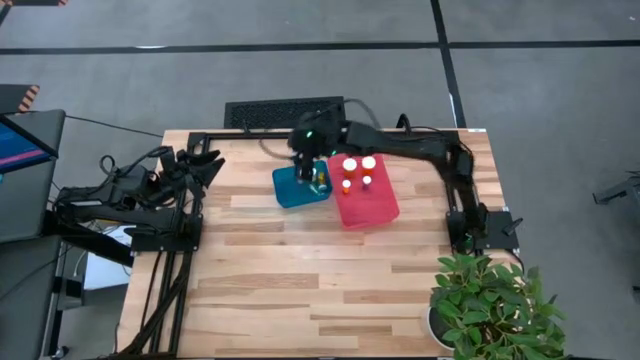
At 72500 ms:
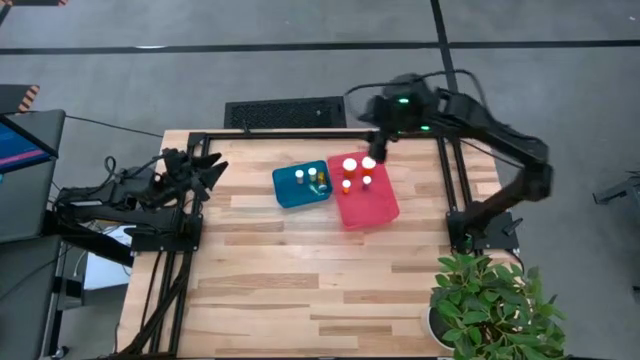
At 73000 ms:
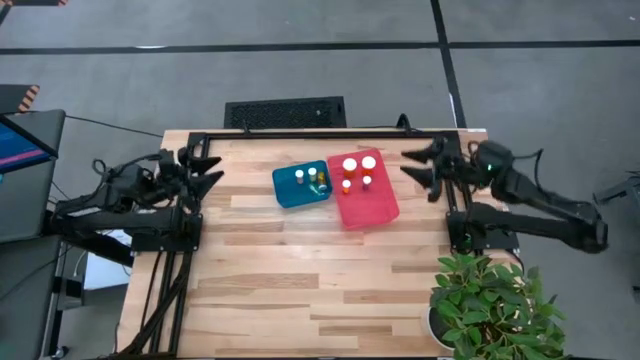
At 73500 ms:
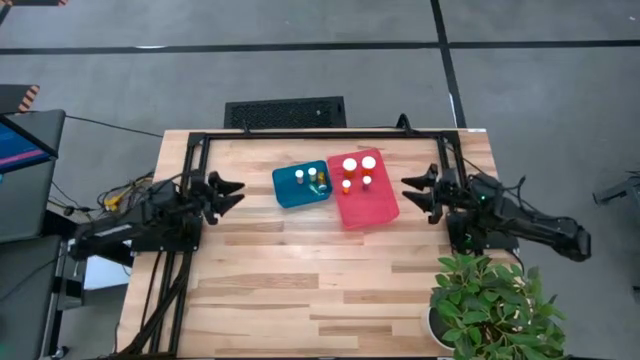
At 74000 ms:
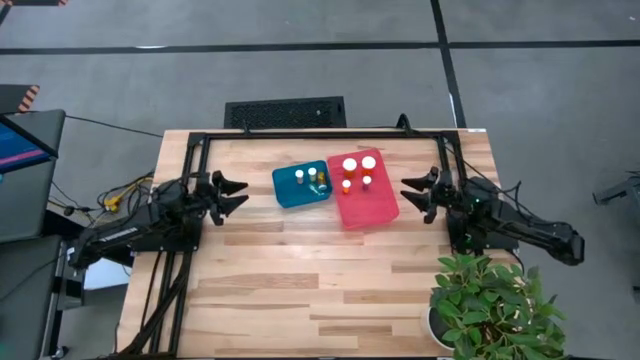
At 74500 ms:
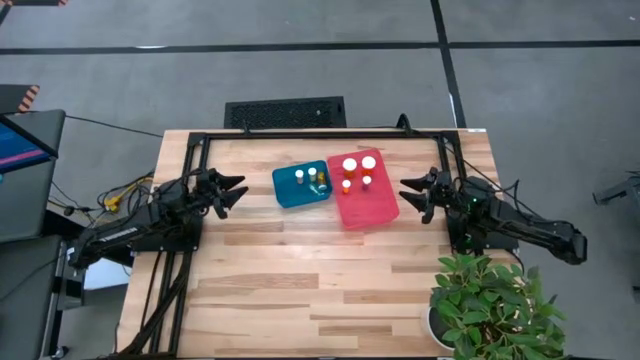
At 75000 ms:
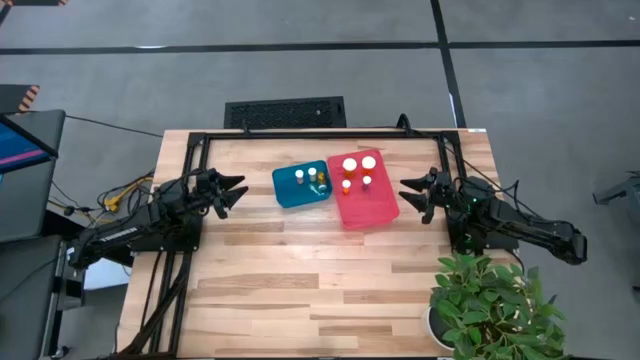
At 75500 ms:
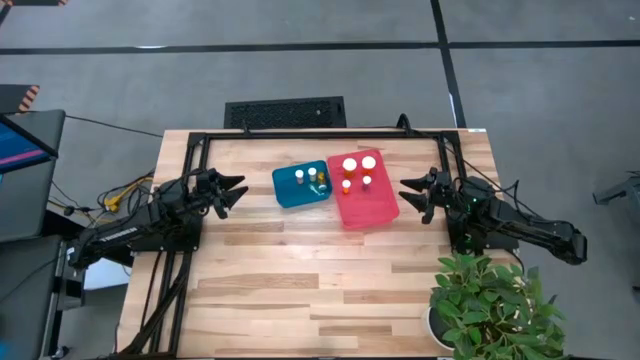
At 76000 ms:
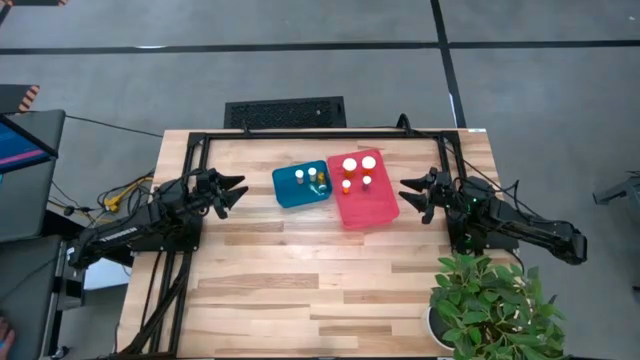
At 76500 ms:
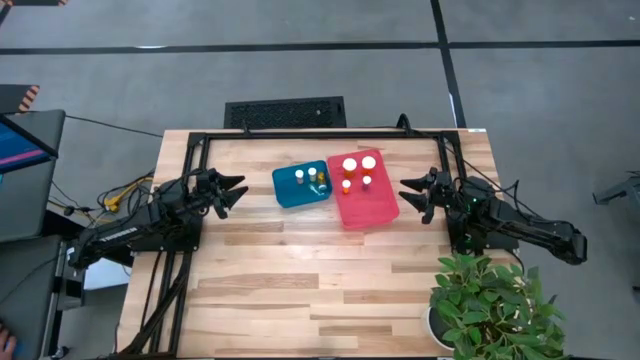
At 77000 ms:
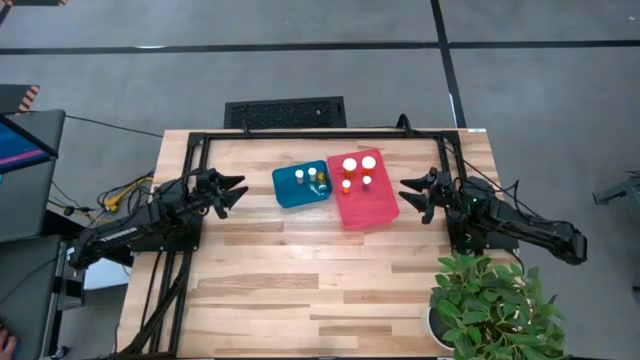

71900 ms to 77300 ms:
Task: Pick and place medicine bottles into bin by pill shape (circle, oval)
Return to Home Position

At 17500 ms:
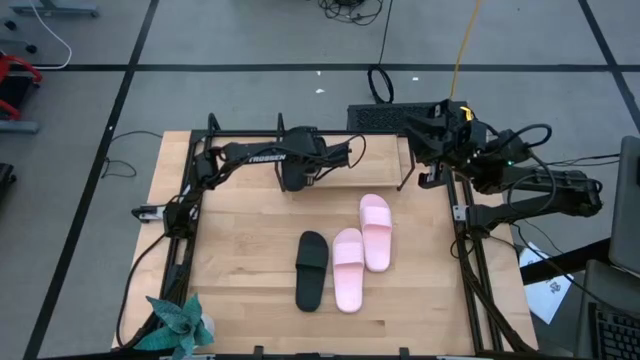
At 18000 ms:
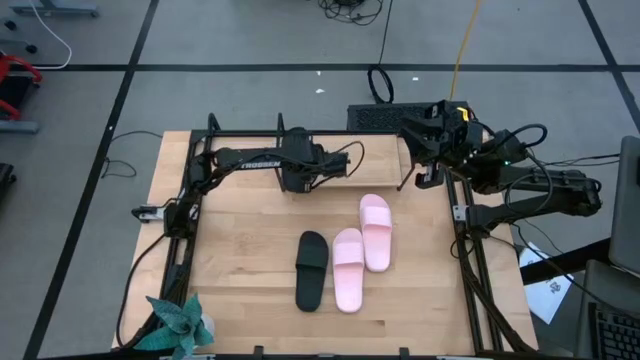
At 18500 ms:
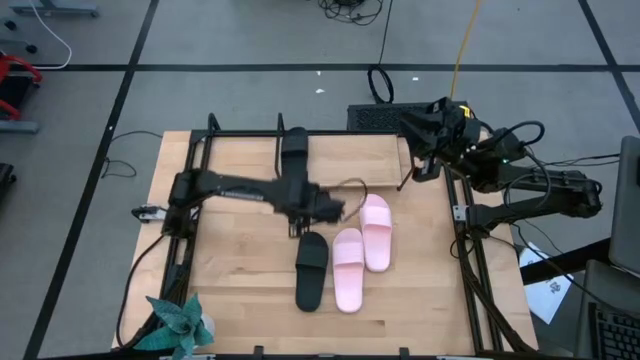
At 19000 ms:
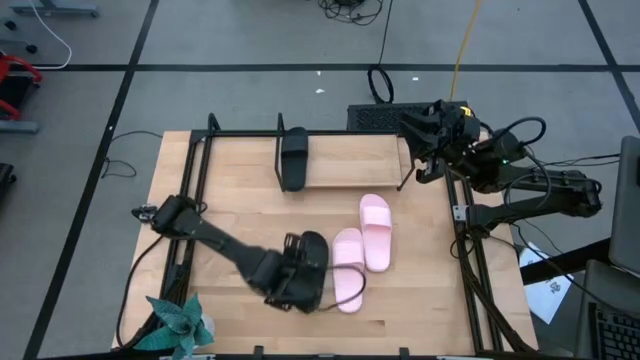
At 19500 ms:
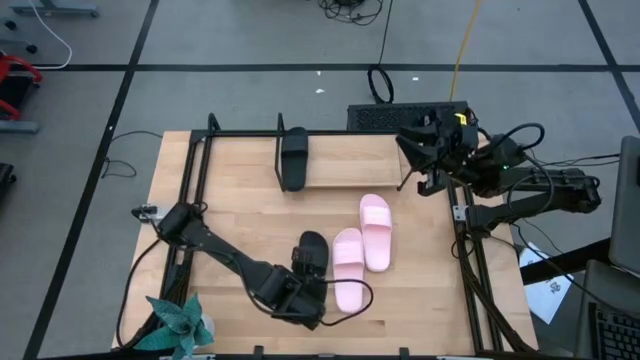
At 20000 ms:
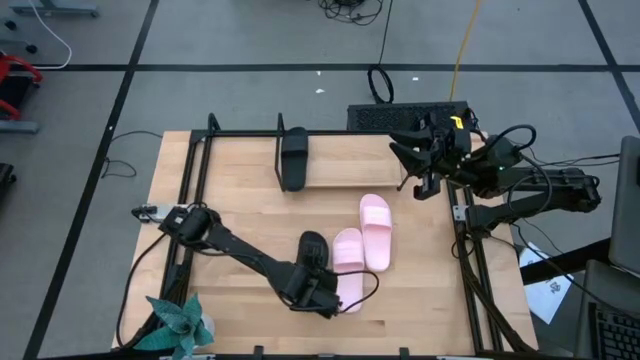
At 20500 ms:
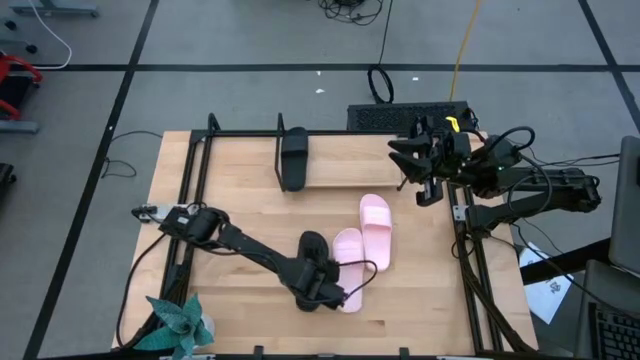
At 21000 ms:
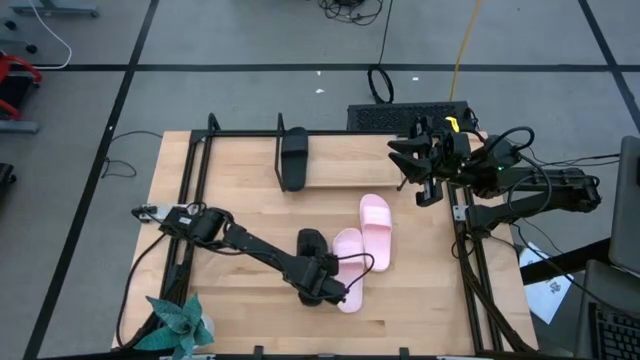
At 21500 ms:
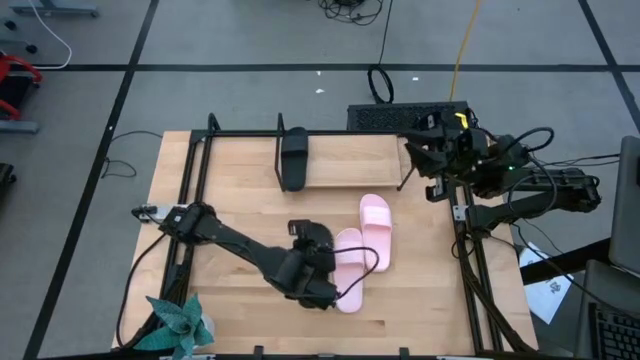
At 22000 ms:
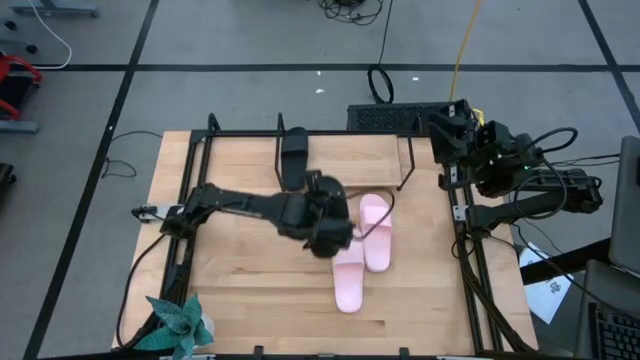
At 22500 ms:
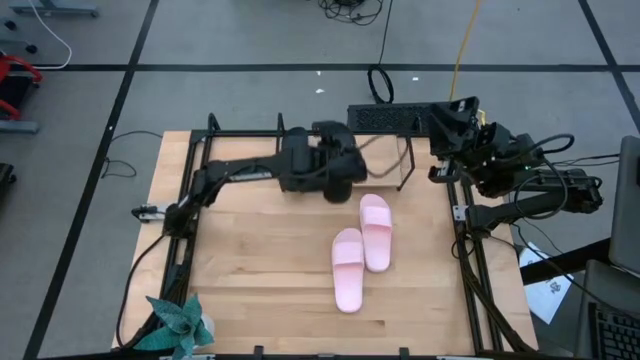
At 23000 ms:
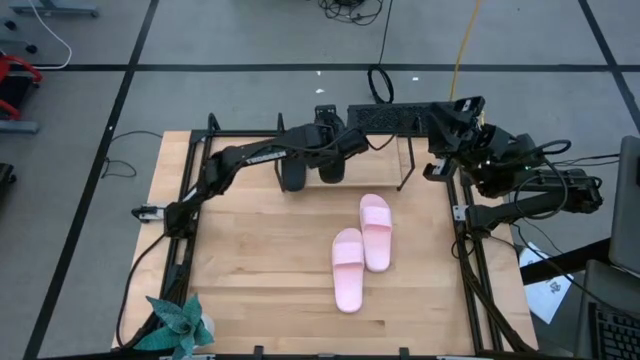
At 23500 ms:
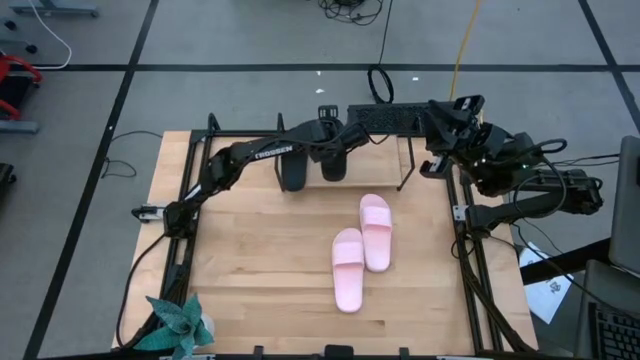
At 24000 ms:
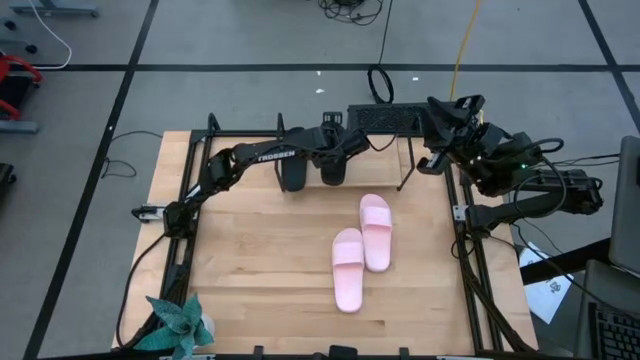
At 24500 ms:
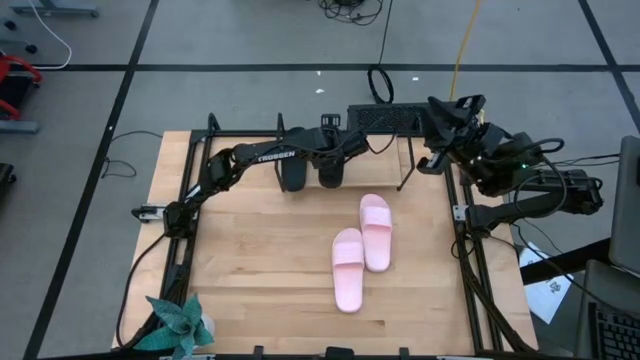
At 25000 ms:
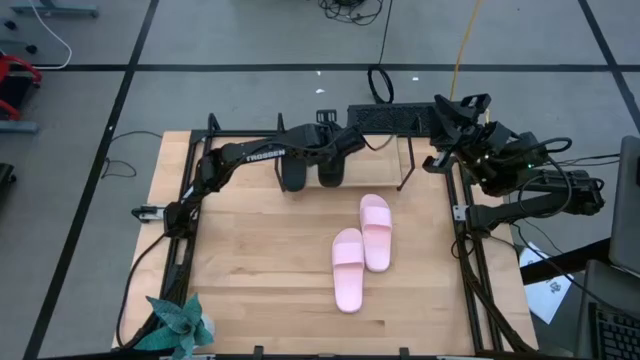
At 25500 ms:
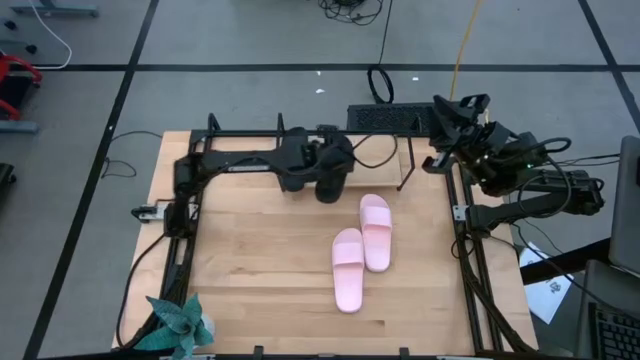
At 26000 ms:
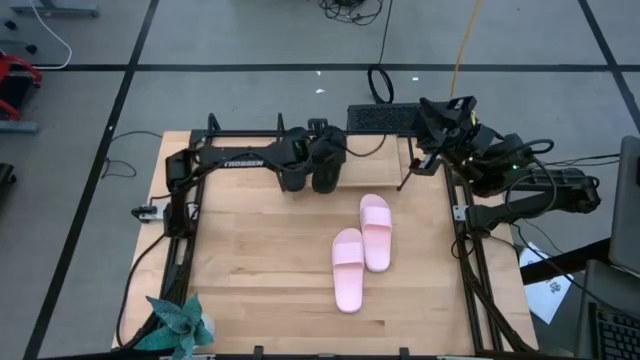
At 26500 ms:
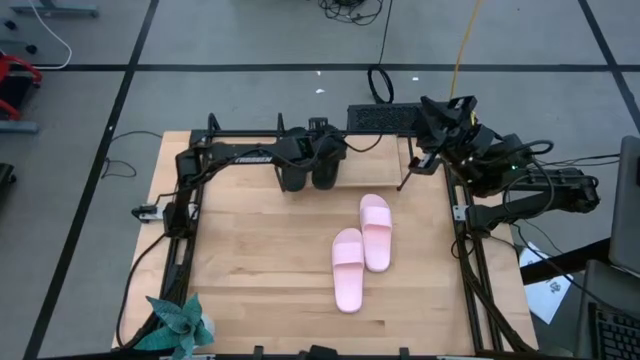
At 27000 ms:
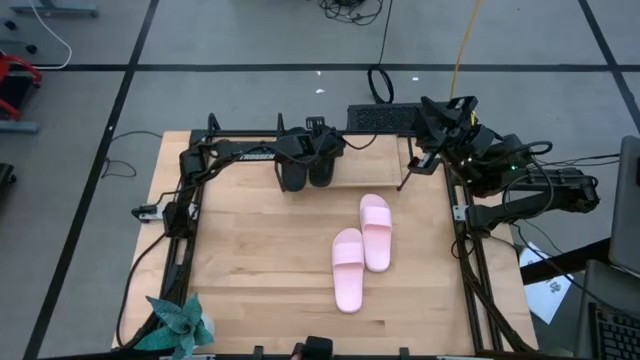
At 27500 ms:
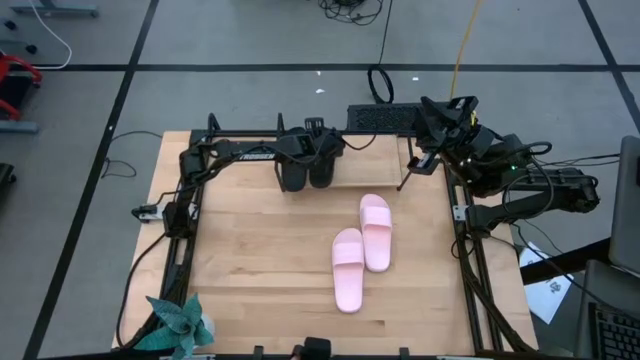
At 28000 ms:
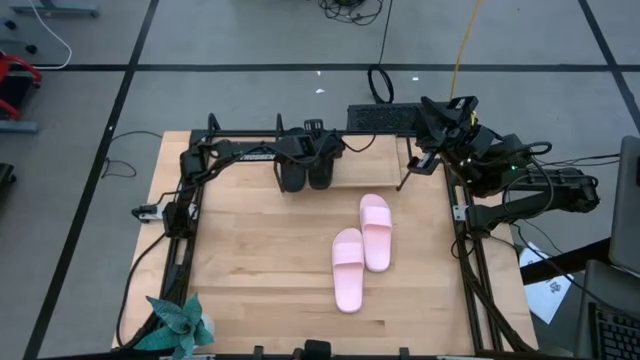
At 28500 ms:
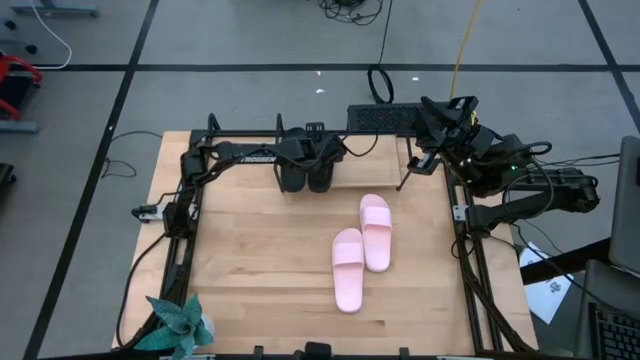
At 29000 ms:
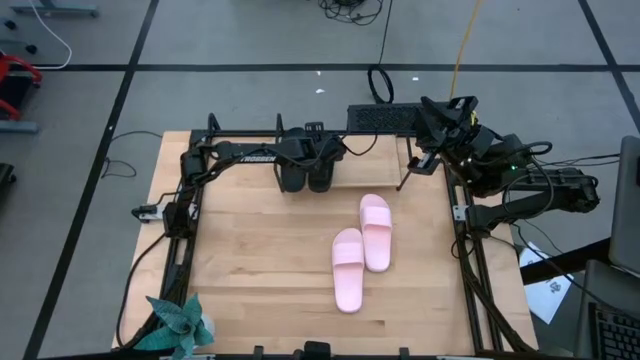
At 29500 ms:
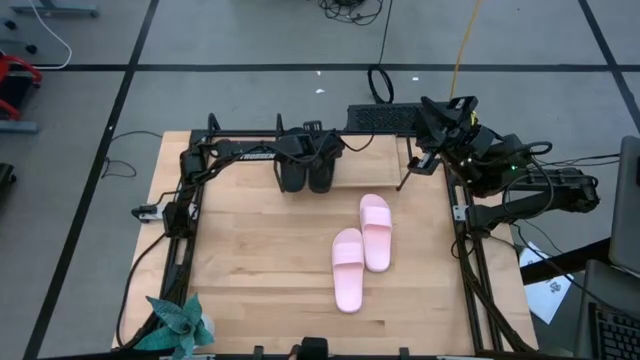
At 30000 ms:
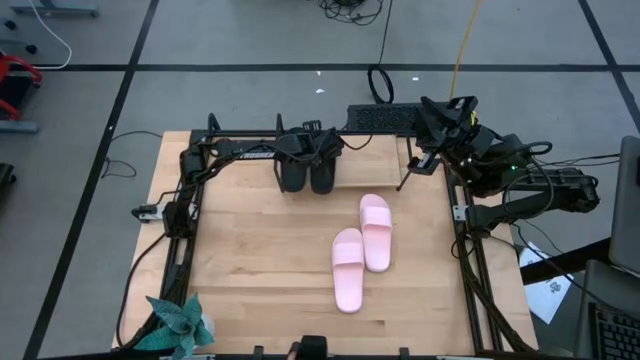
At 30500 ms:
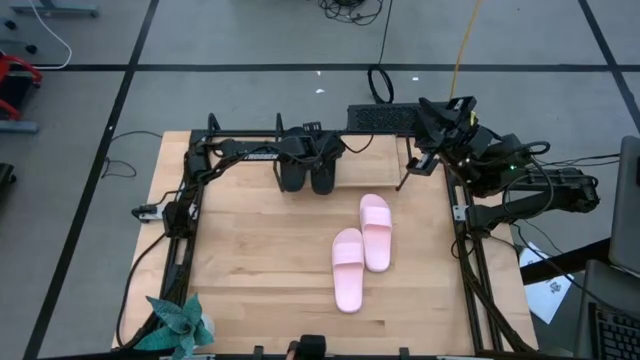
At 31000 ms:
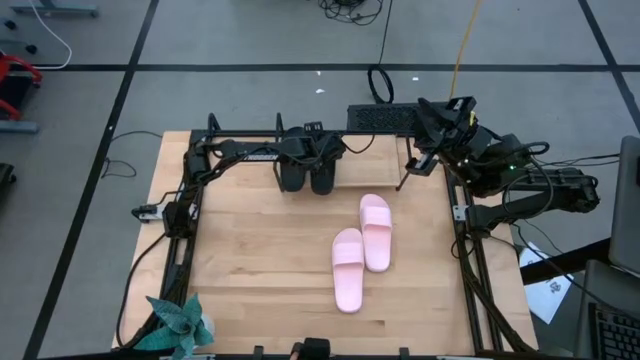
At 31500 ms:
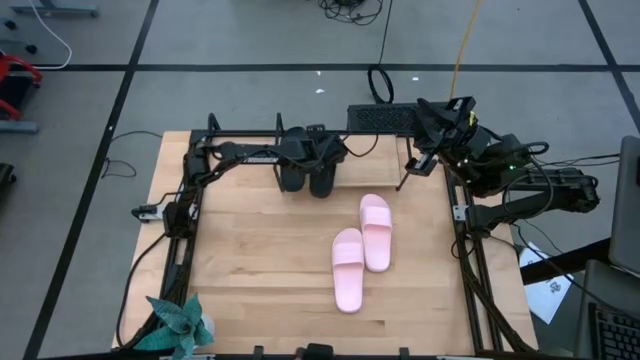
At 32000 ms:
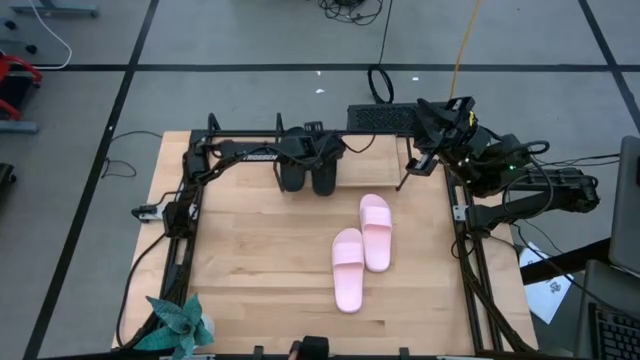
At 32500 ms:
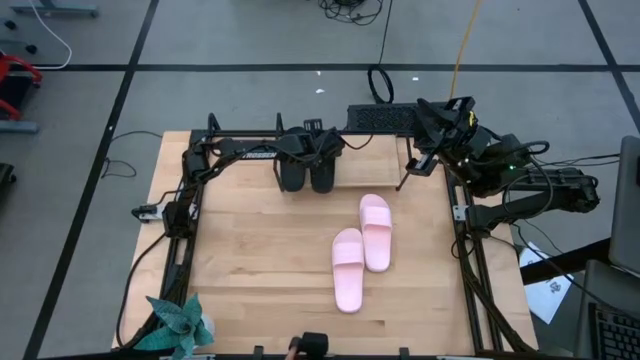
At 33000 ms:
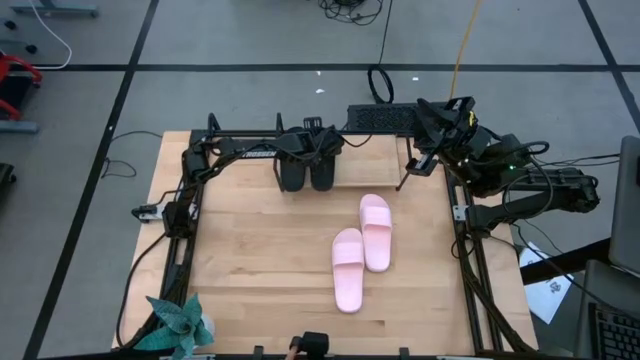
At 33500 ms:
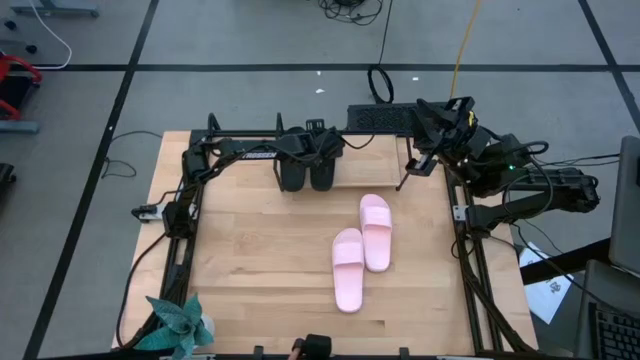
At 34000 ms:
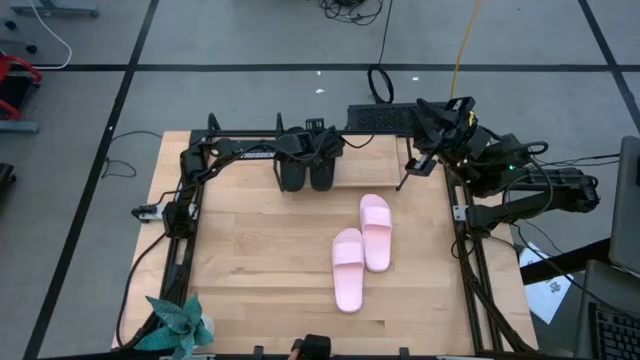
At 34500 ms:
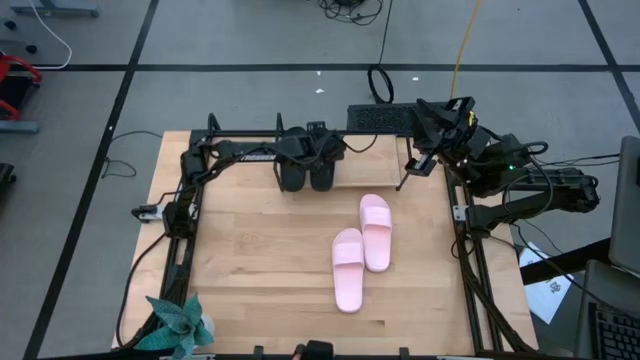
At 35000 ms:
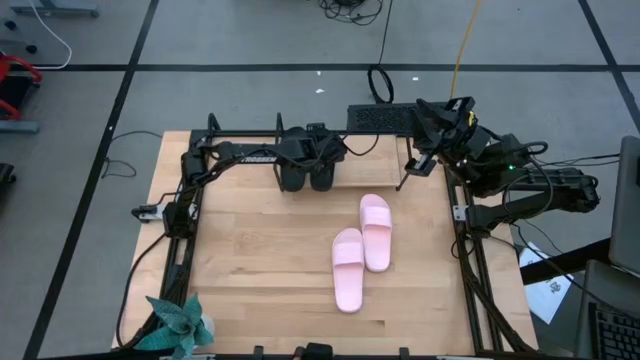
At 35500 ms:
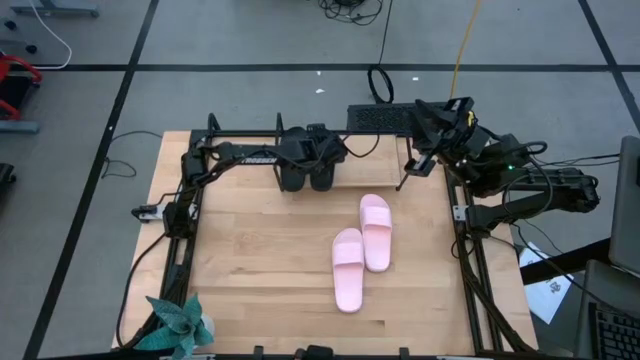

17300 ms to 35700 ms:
Task: Pick and place slides into the shelf
Put the black slide on the shelf
